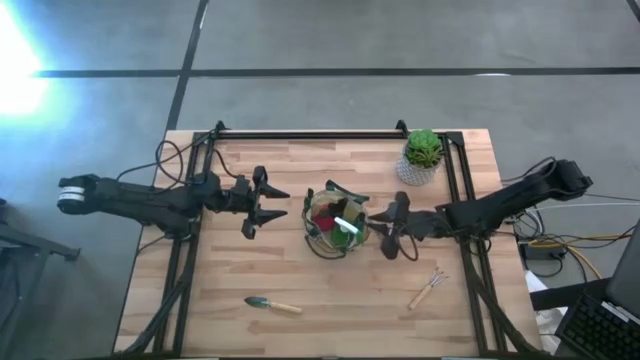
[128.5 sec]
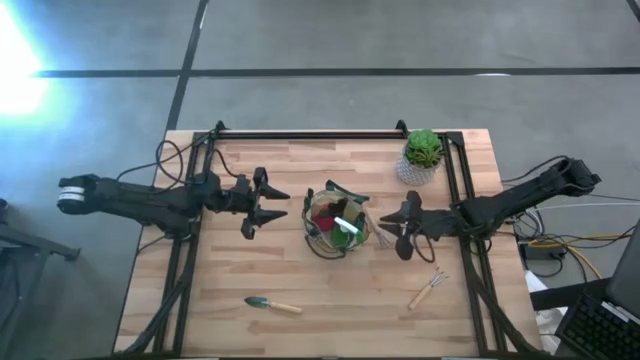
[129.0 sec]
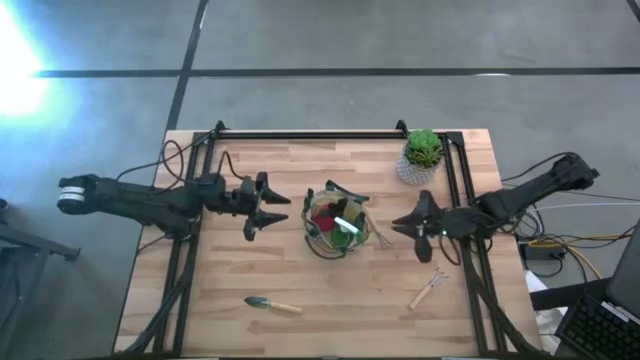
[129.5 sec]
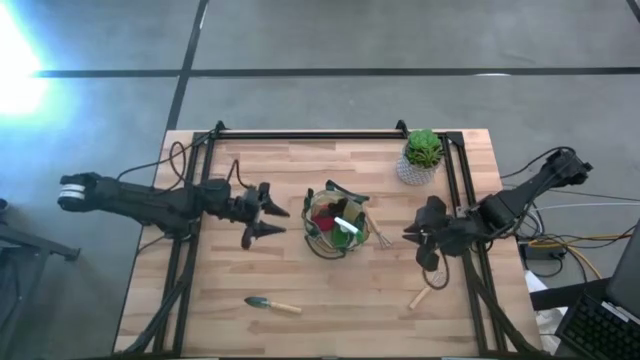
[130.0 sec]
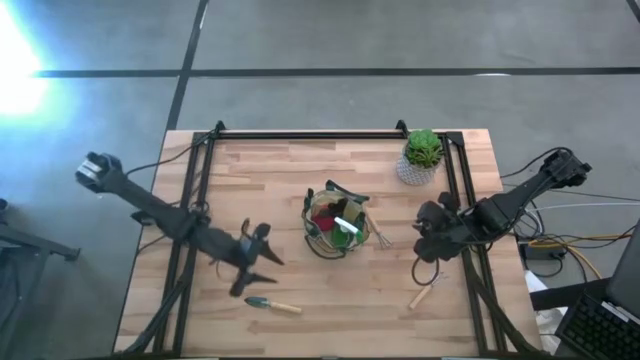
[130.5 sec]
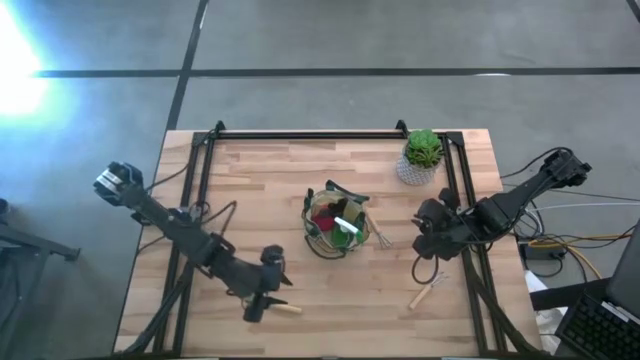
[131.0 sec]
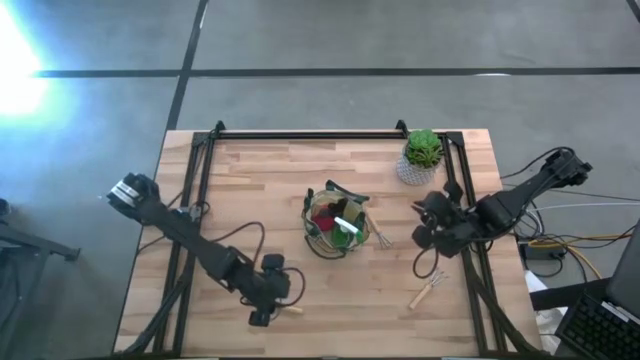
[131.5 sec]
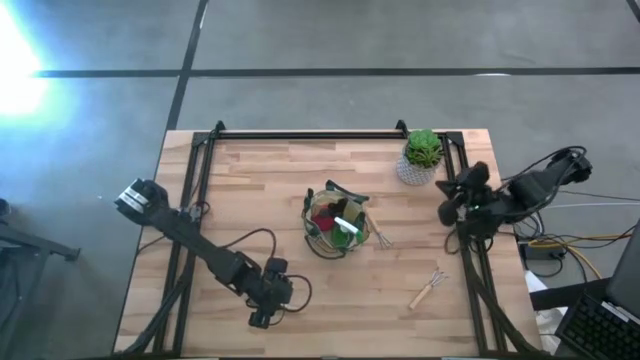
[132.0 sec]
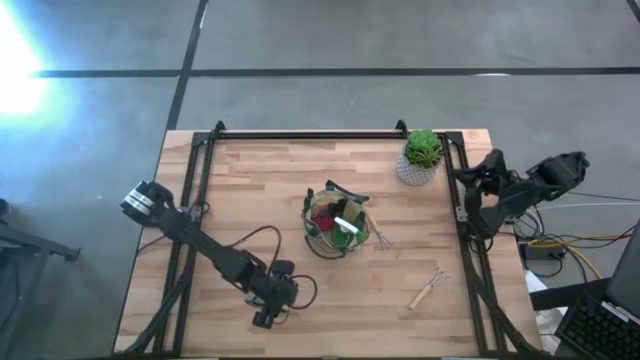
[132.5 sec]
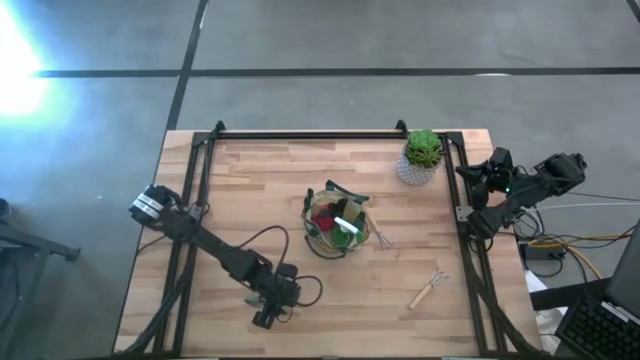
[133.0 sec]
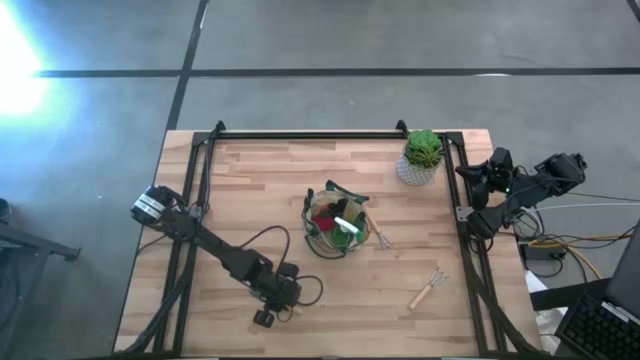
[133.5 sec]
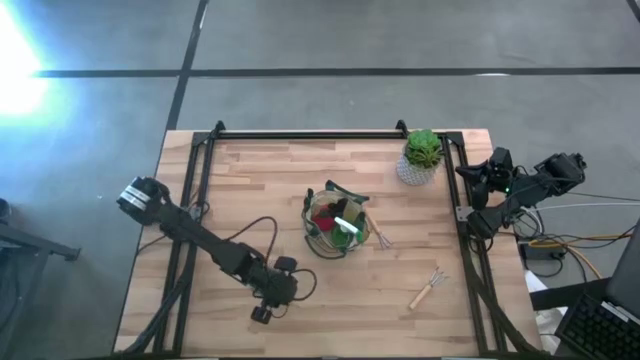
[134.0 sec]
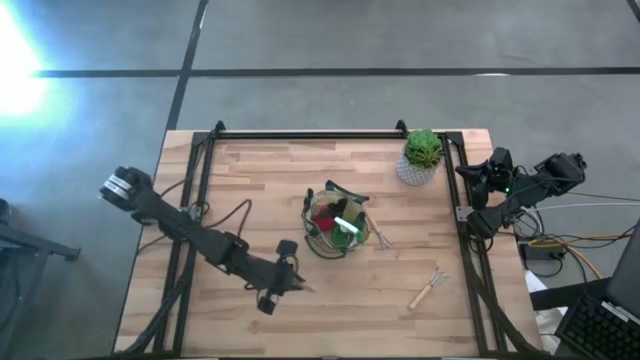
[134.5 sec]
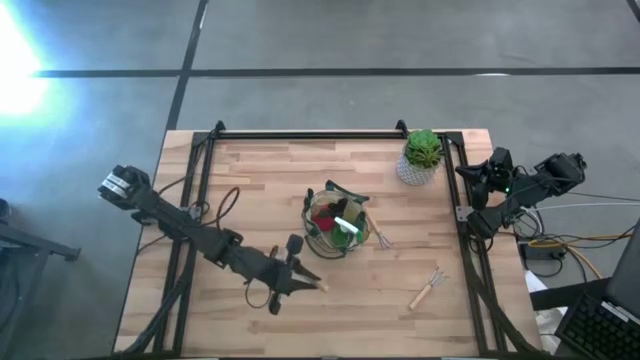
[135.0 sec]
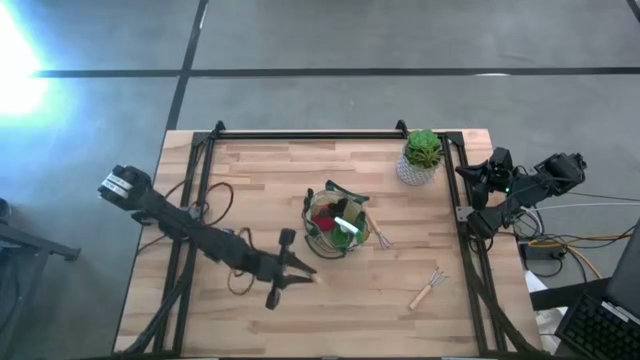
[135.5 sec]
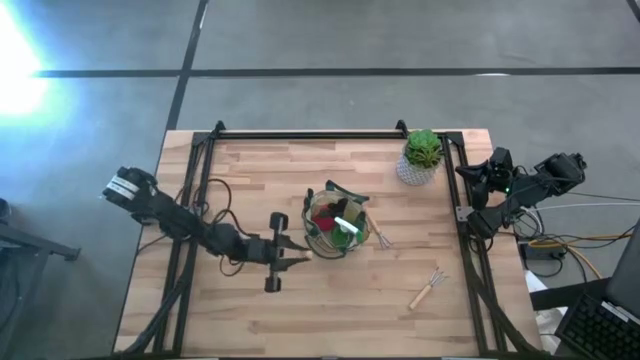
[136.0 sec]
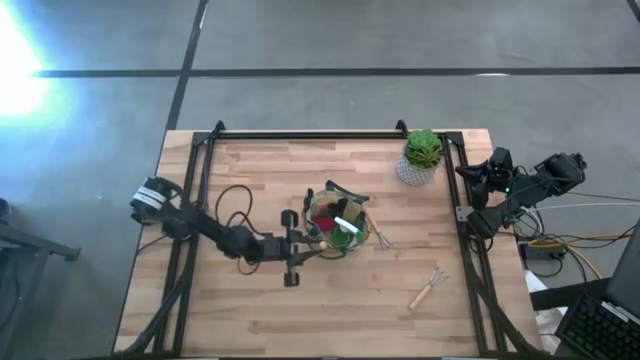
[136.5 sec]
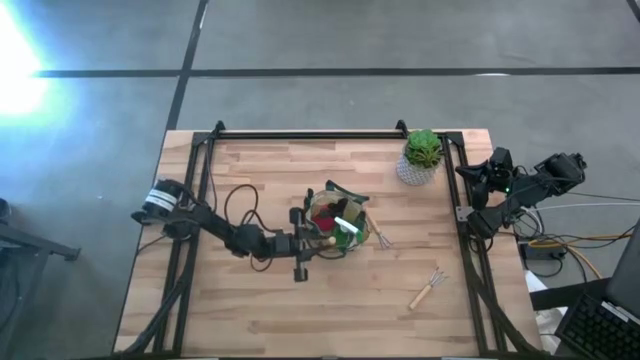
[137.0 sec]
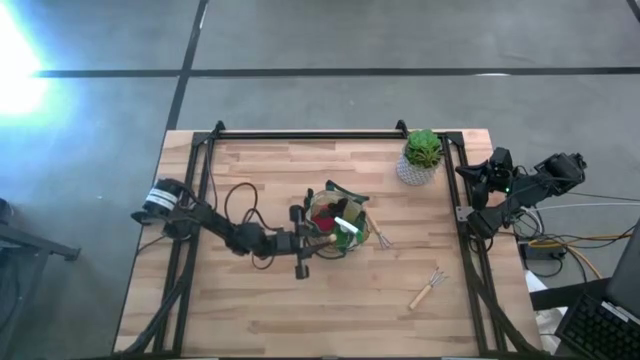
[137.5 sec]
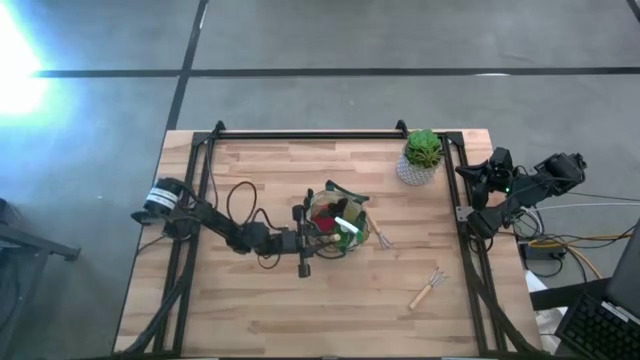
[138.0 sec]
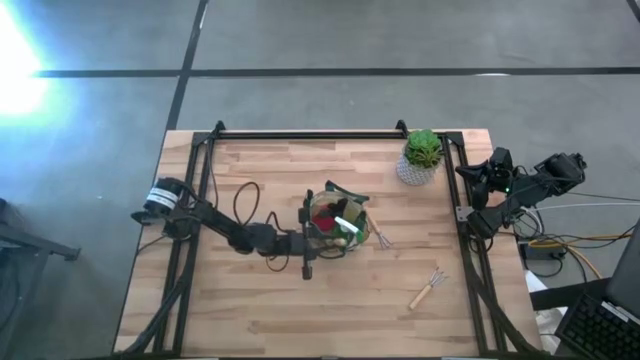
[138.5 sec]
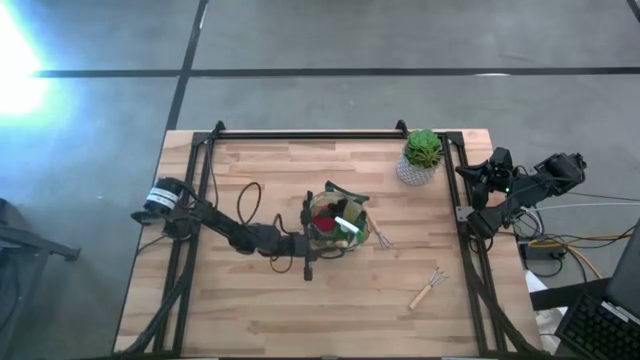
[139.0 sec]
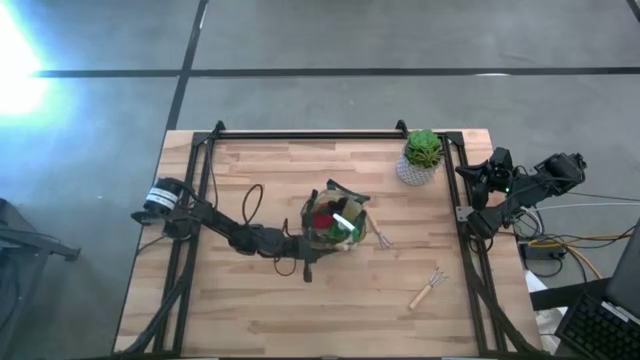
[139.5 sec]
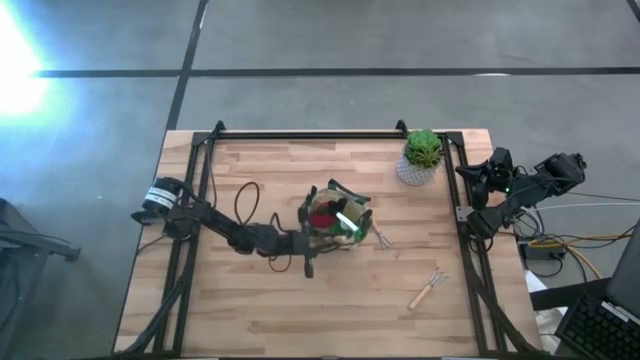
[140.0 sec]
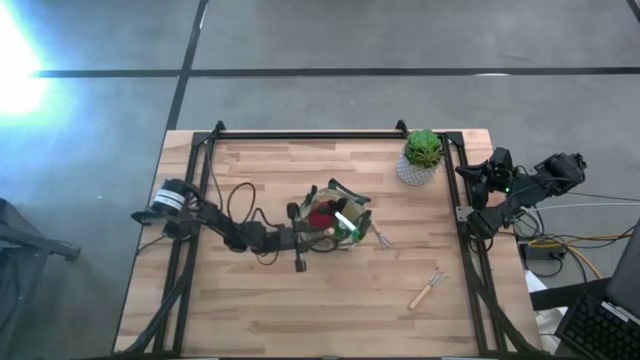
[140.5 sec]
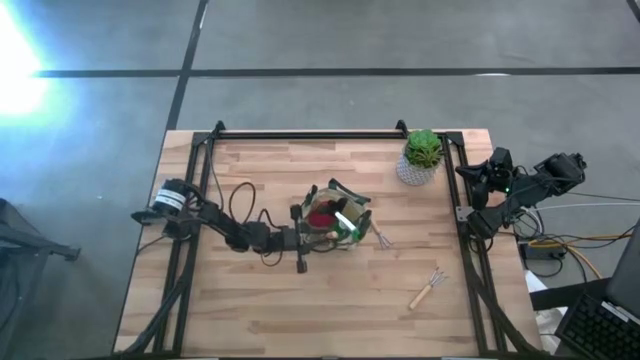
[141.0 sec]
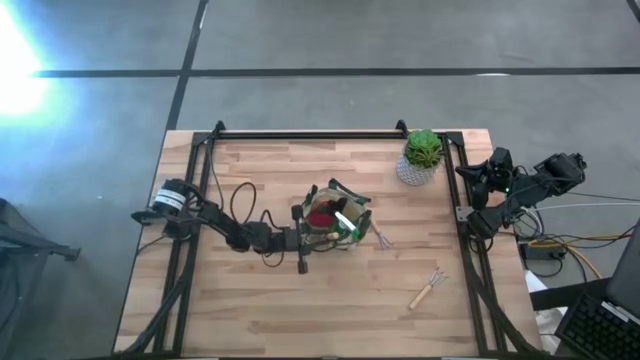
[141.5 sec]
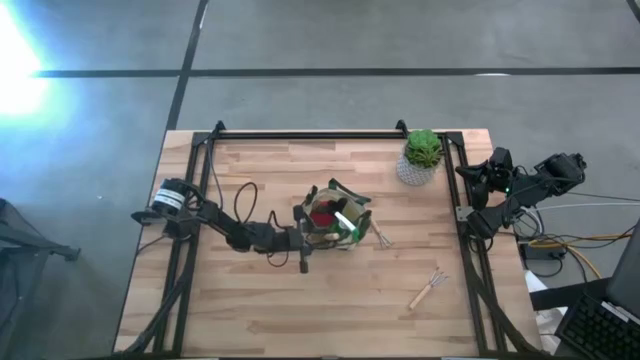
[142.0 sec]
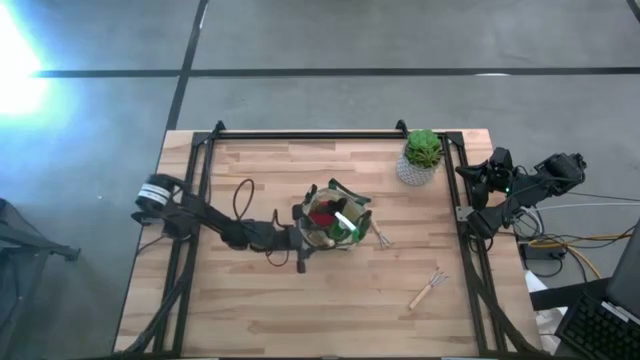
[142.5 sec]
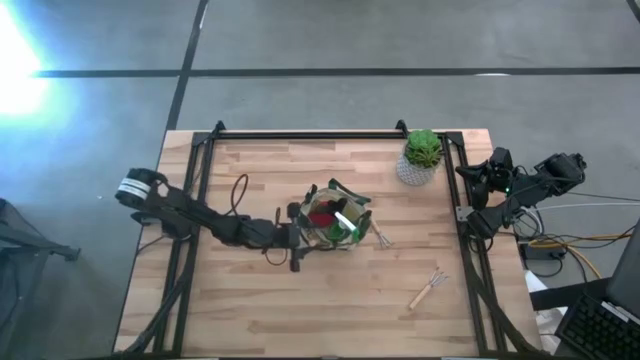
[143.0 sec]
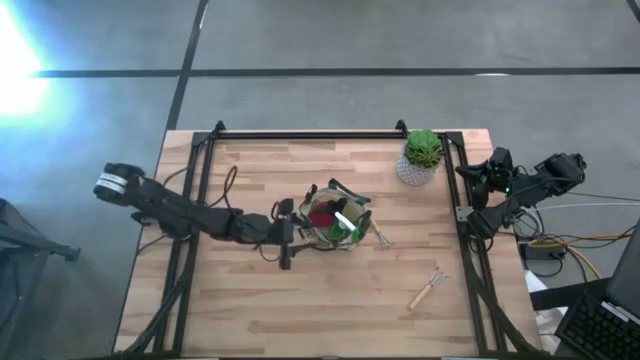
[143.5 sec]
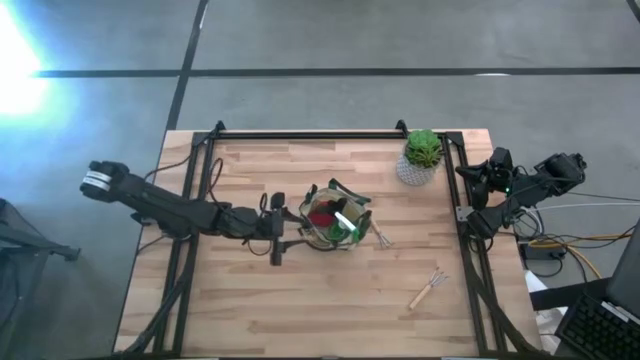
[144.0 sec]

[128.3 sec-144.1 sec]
Task: Pick & Place Garden tools in Gardening bag
Put the brown trowel into the light brown gardening bag

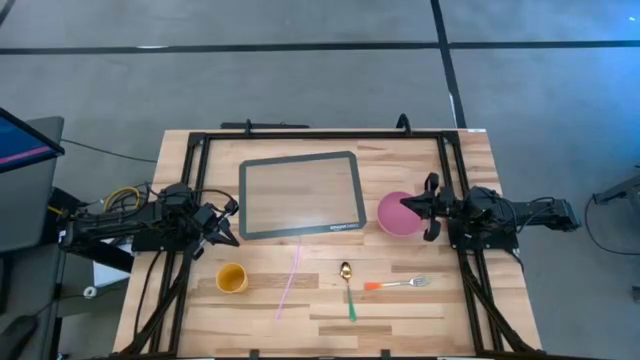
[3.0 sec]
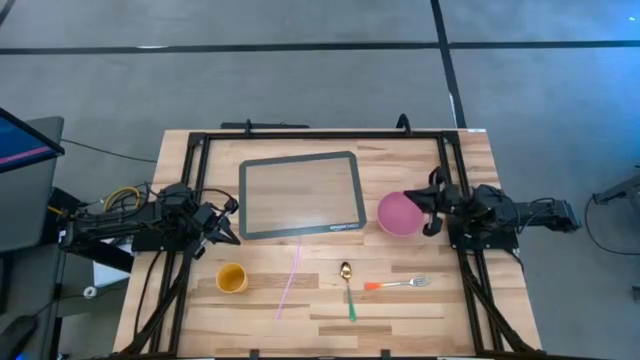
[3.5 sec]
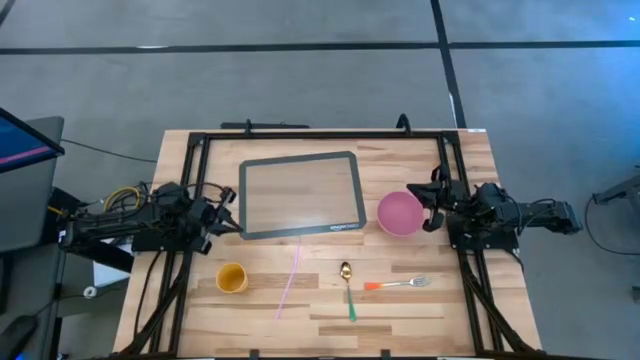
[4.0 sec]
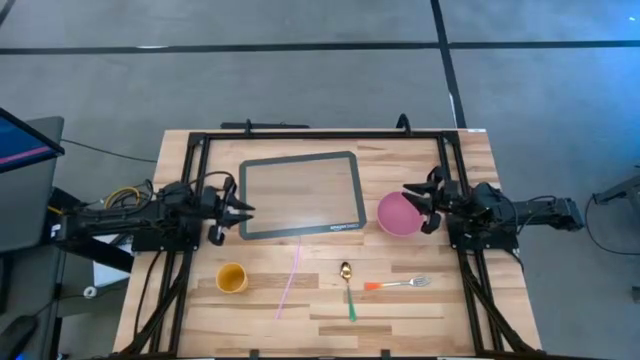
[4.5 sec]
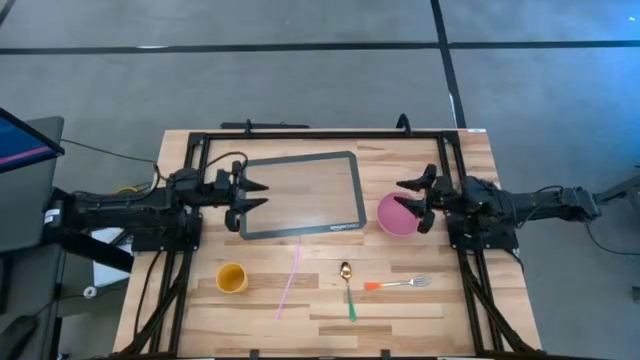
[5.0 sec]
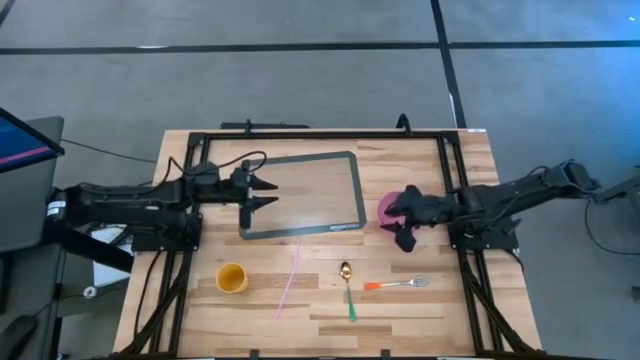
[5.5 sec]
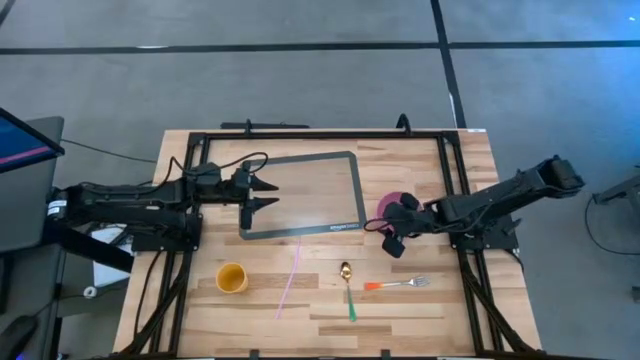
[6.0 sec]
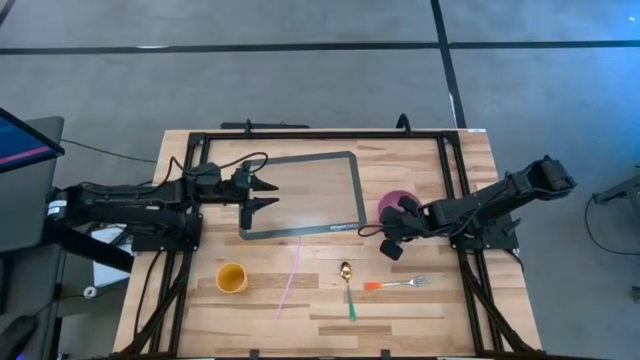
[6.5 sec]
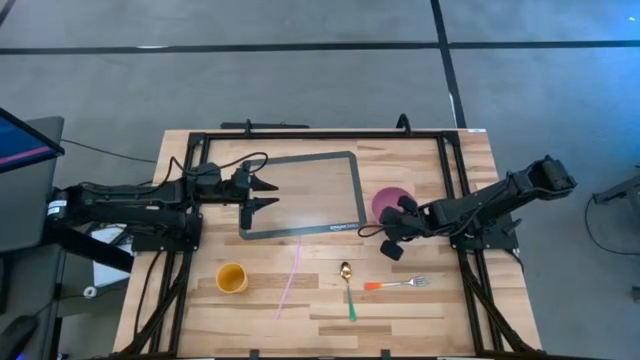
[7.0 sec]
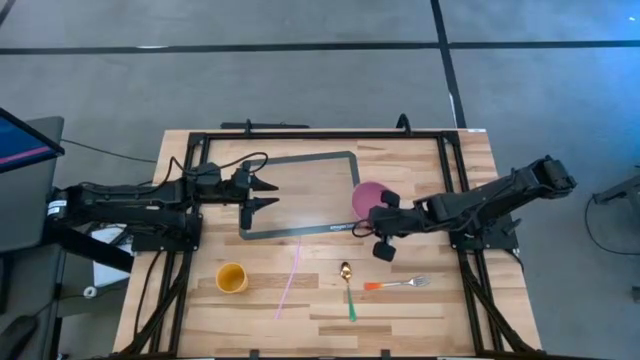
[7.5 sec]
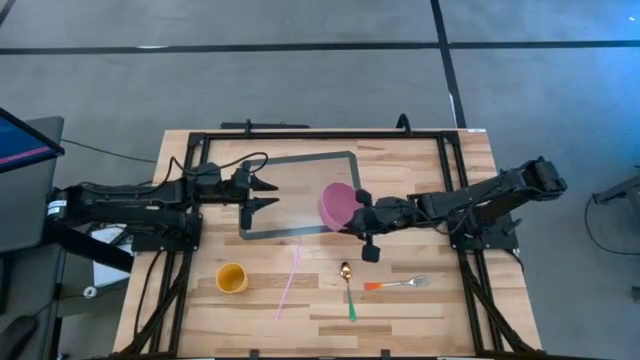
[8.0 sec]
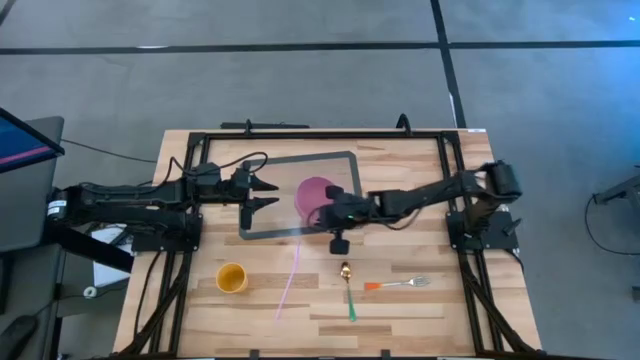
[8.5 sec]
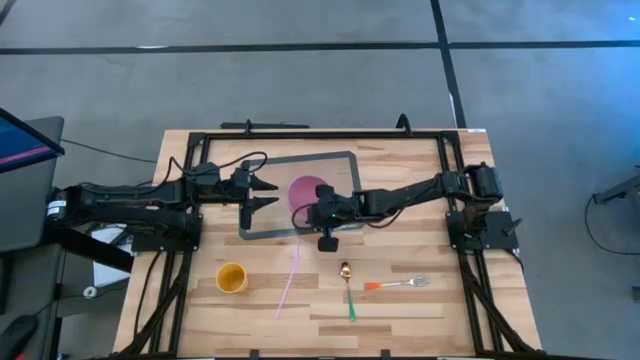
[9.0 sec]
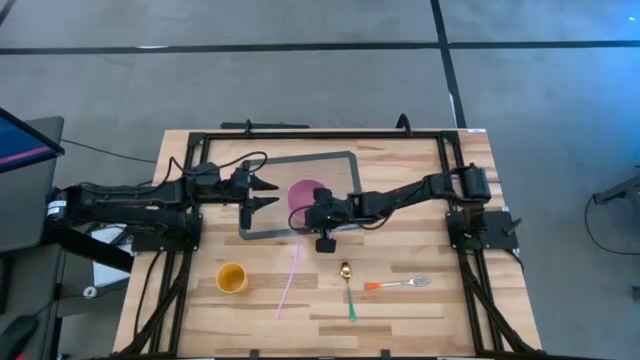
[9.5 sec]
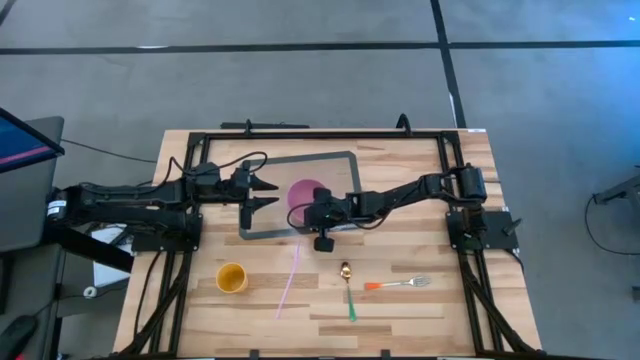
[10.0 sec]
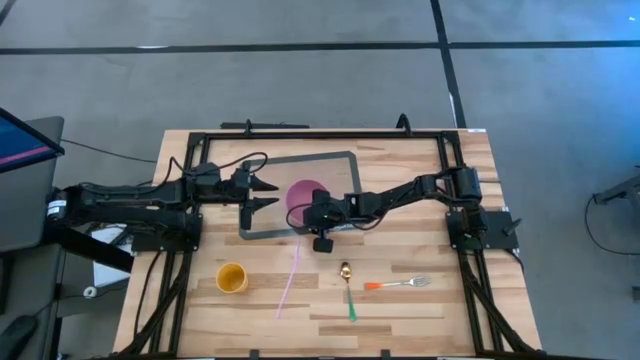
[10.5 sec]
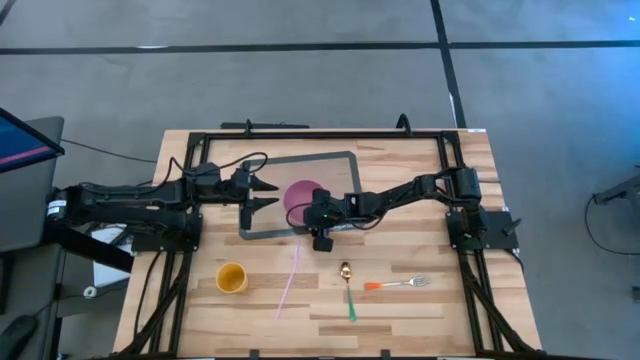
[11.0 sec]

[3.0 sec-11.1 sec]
Task: Pick & Place Utensil
Put the pink bowl on the transparent mat
